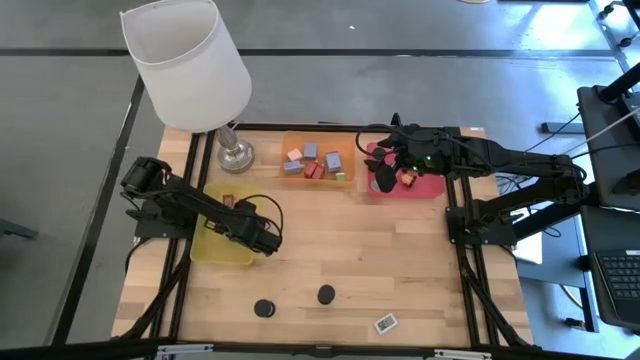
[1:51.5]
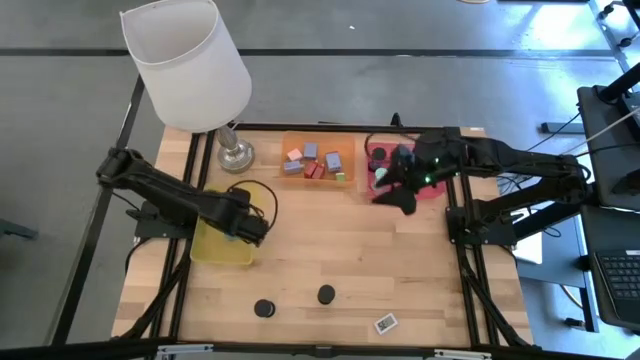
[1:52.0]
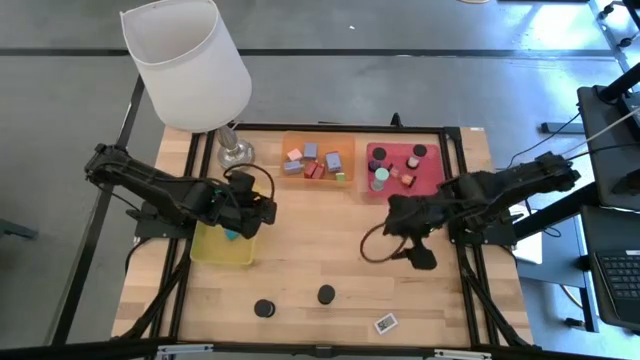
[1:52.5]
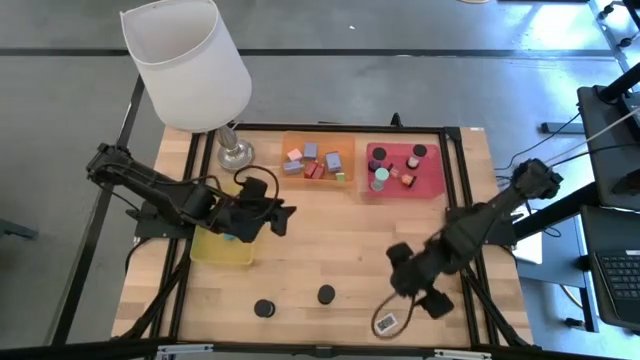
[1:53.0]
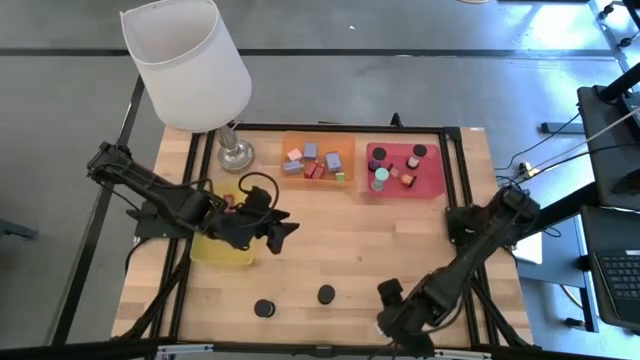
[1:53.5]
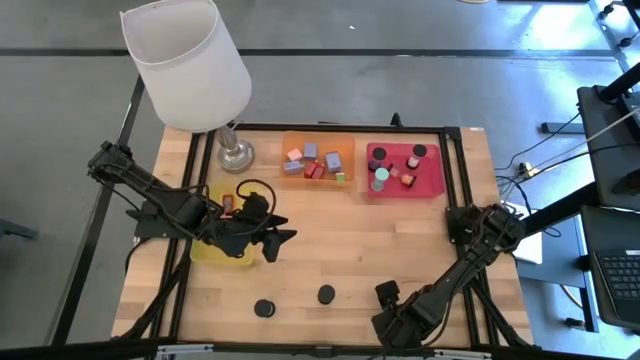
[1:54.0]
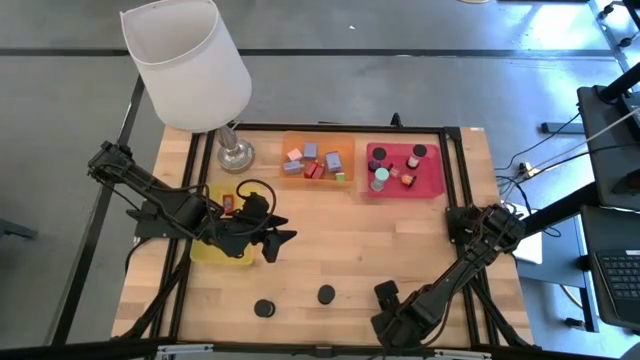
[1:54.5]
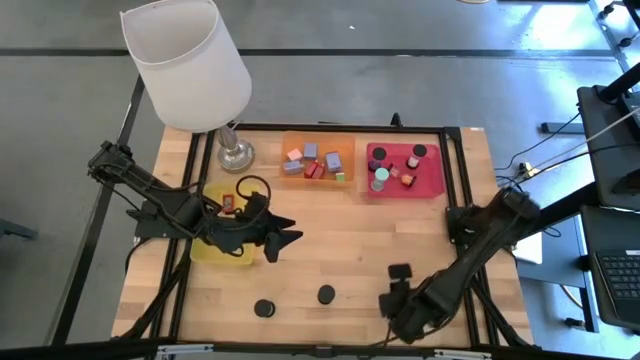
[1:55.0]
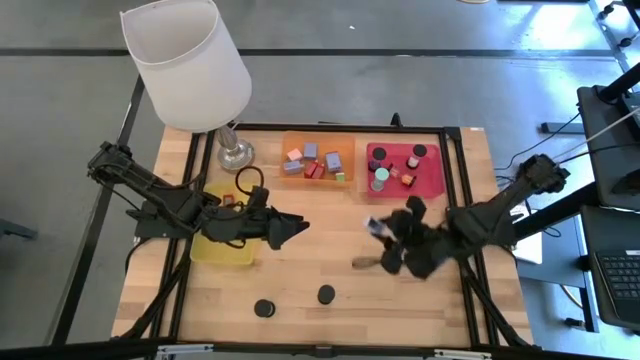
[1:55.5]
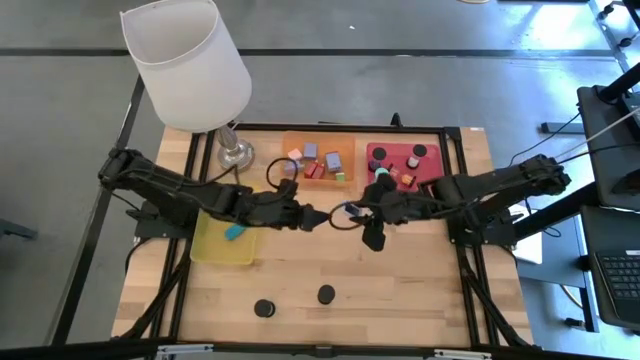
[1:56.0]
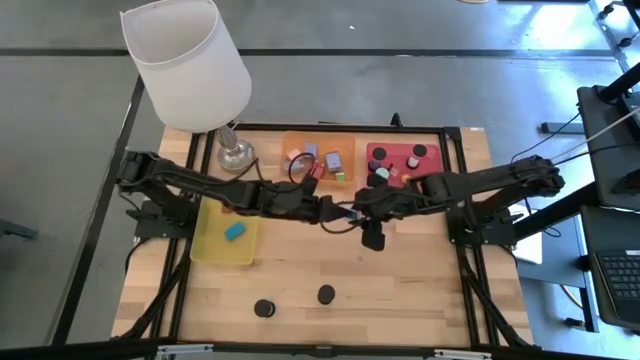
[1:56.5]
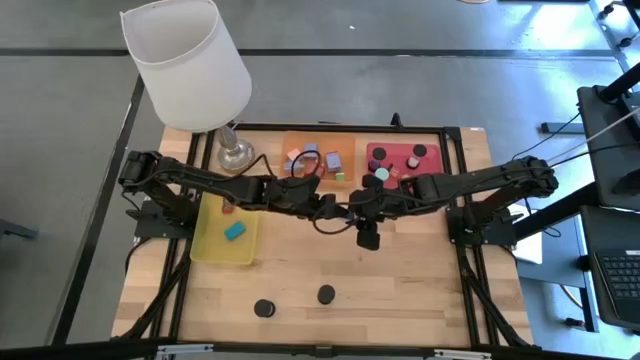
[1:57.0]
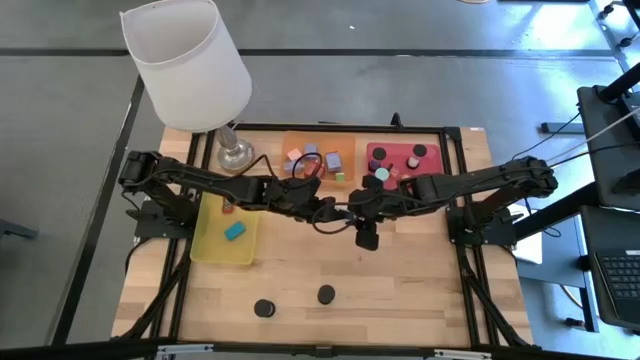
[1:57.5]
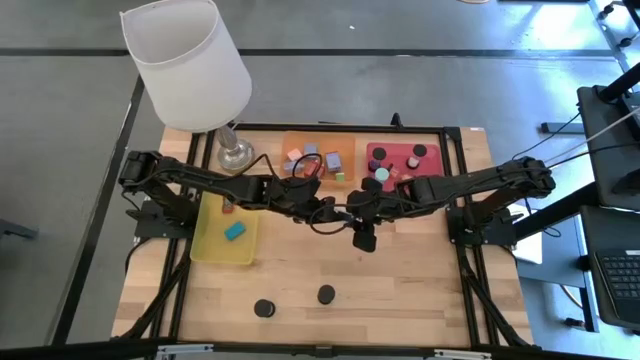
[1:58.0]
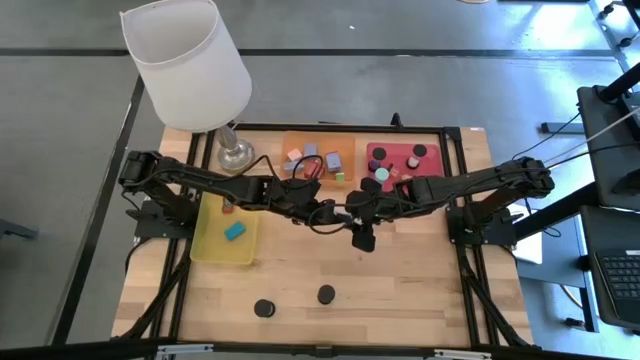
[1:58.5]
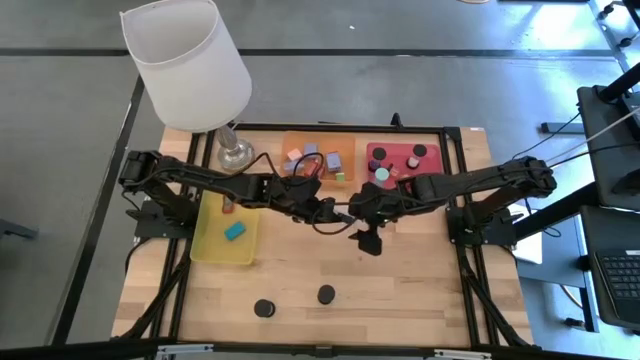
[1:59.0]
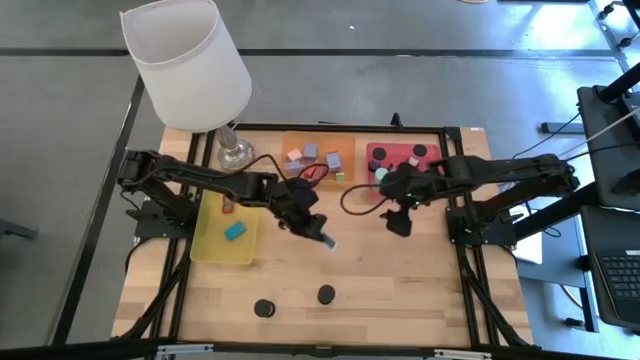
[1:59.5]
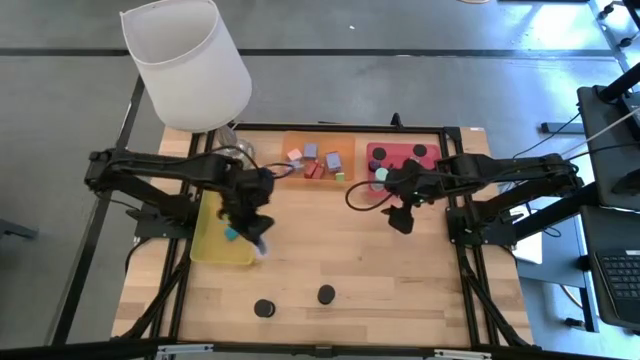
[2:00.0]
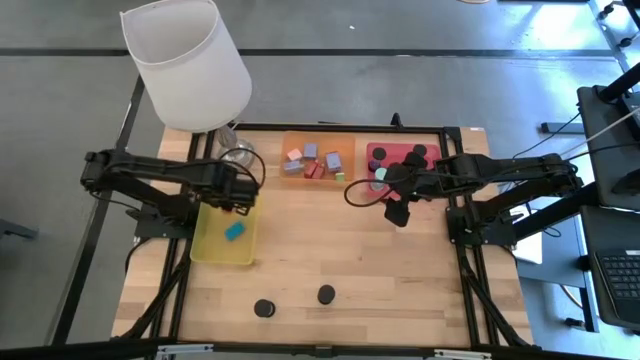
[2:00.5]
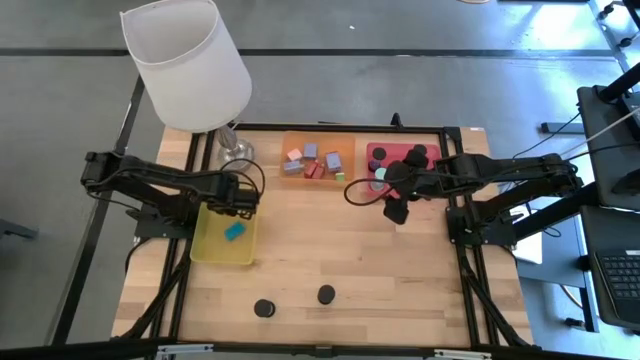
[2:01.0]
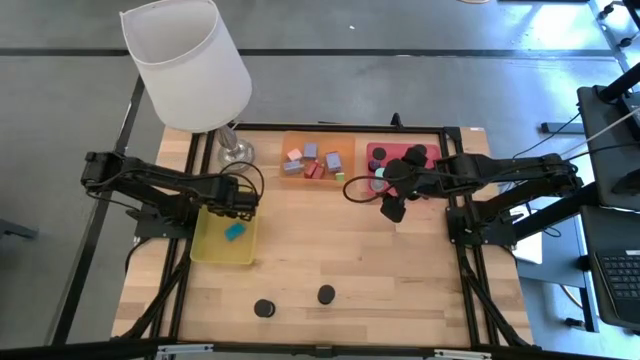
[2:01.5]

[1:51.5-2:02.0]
Task: Pick & Place Office items
Put the white digital timer into the yellow bin

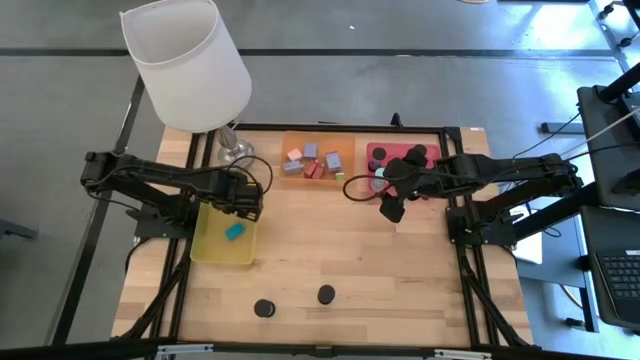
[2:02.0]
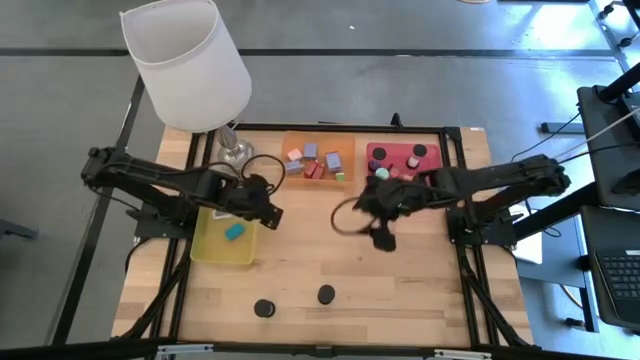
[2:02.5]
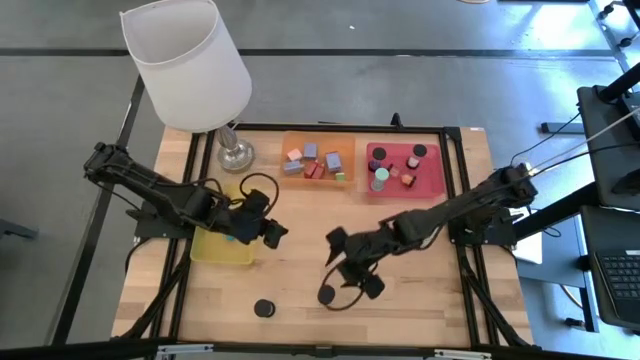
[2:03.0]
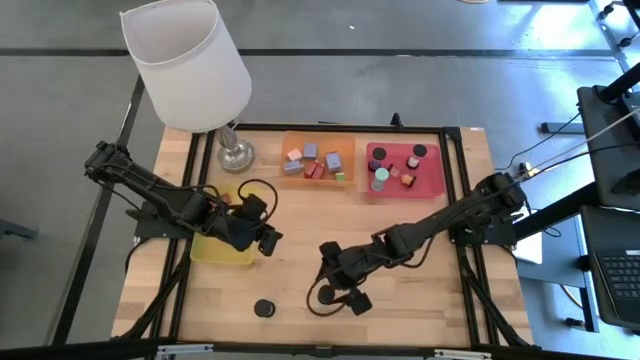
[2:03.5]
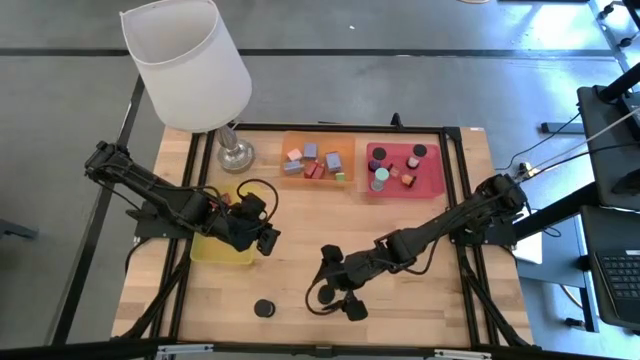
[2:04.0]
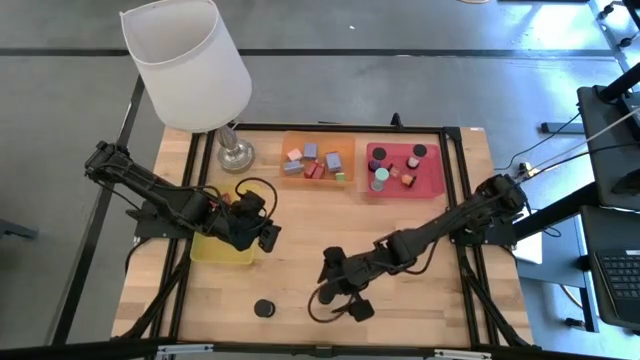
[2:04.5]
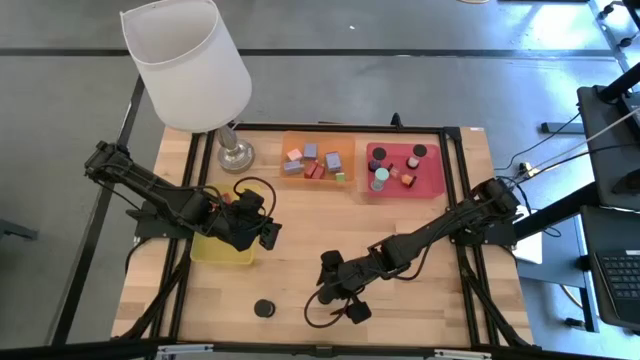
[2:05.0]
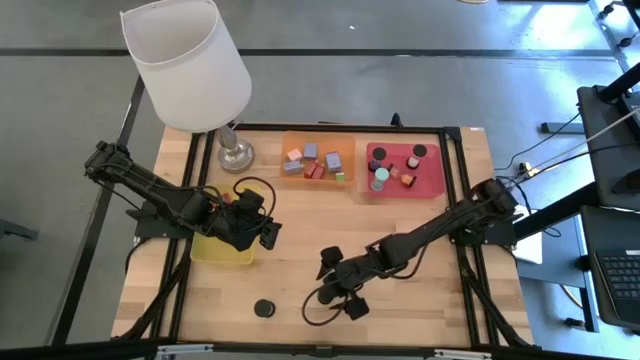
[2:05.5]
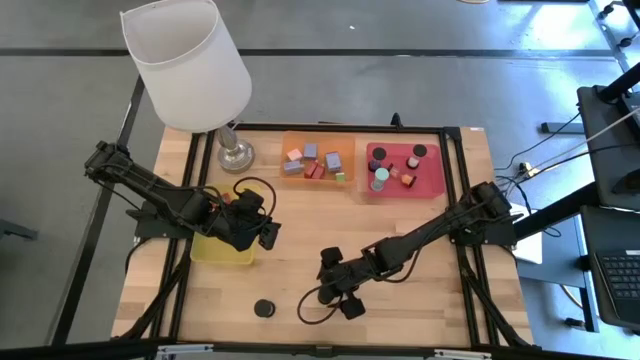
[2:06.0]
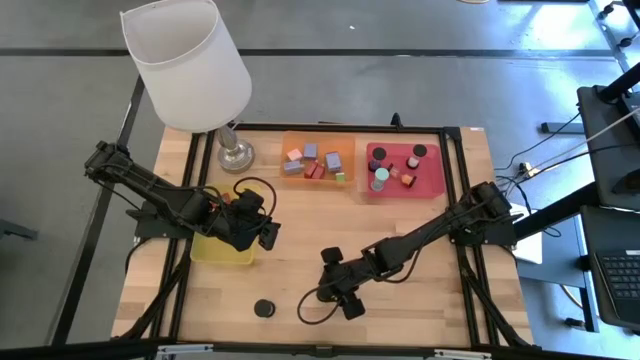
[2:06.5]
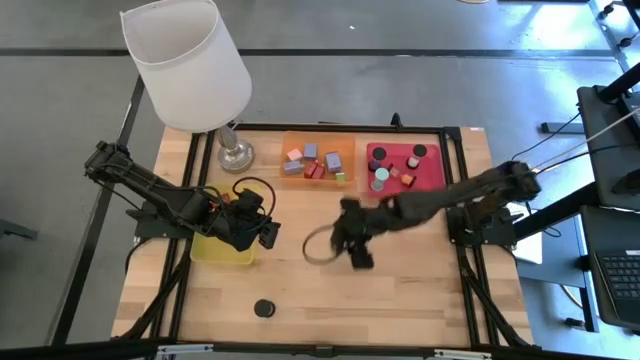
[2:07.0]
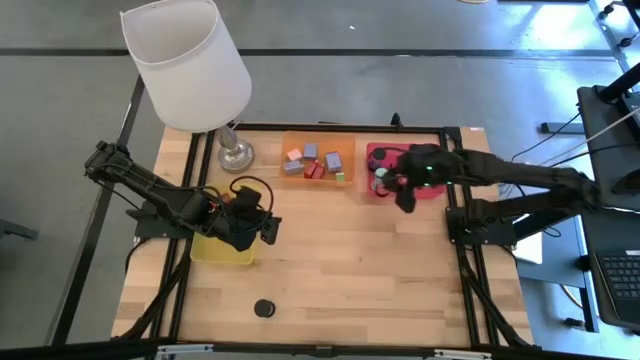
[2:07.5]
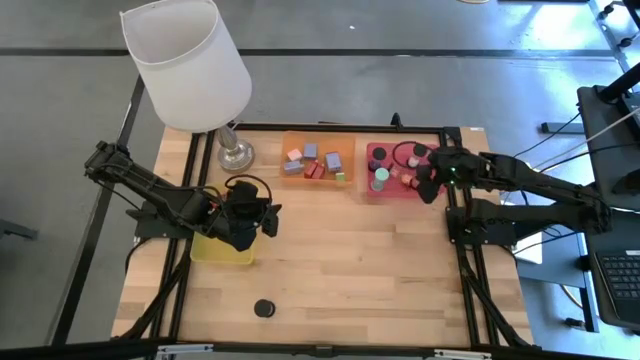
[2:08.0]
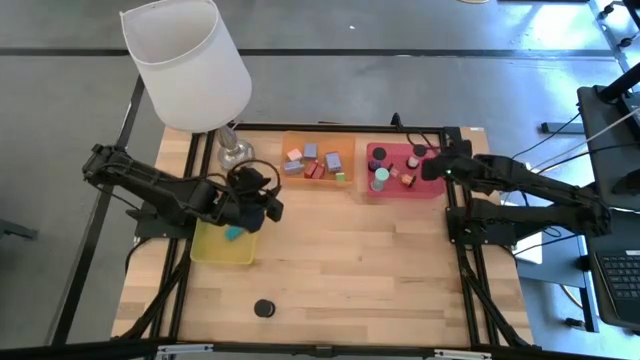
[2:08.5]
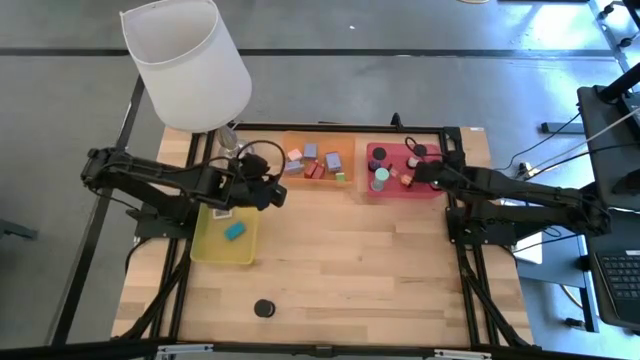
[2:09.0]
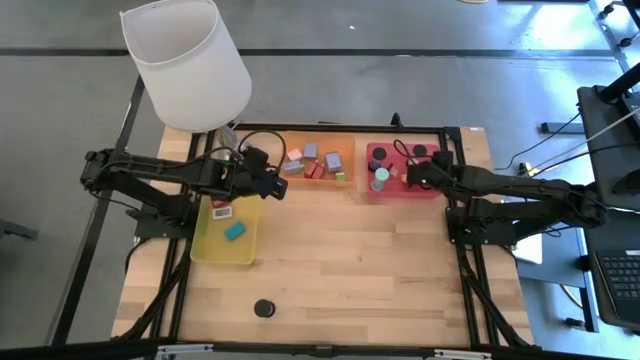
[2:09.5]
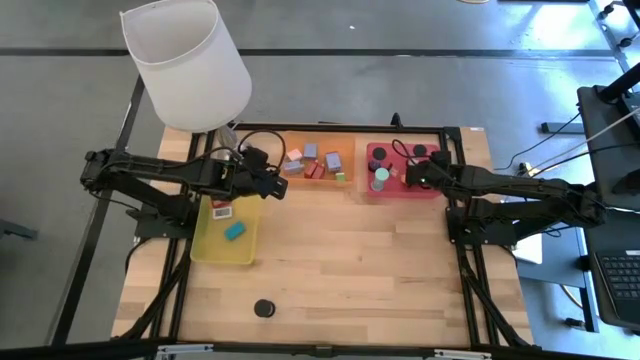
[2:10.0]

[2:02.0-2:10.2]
Put the pink hourglass into the pink bin
